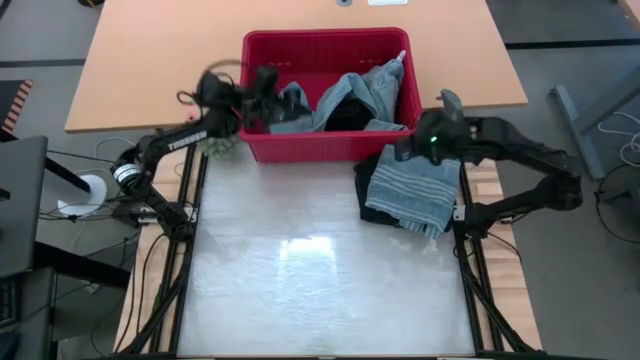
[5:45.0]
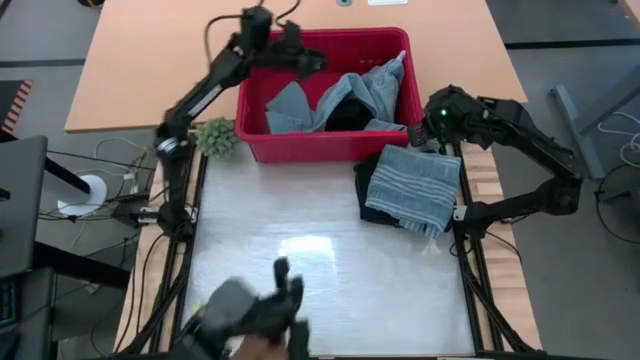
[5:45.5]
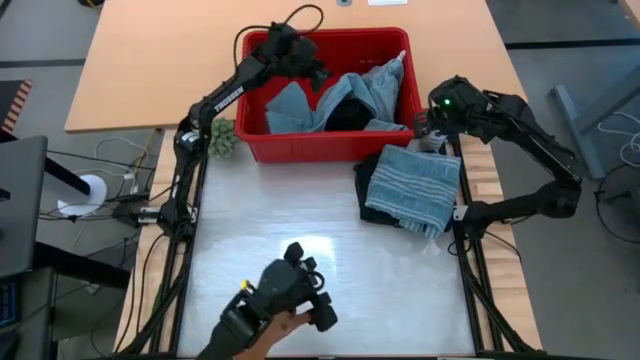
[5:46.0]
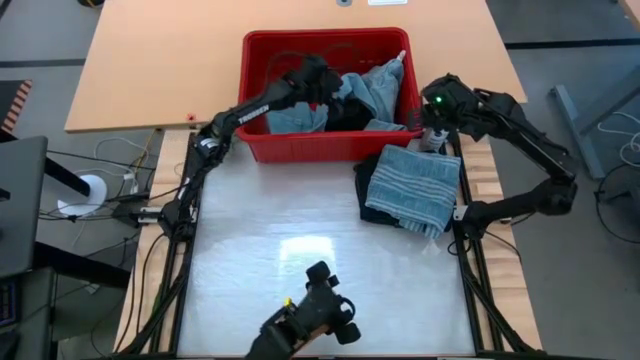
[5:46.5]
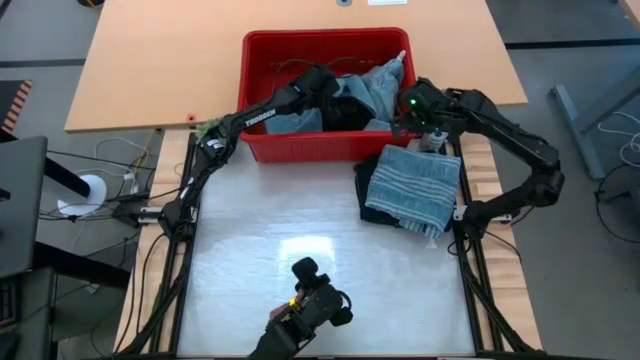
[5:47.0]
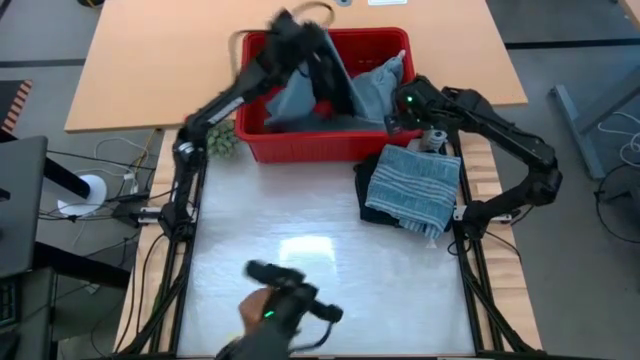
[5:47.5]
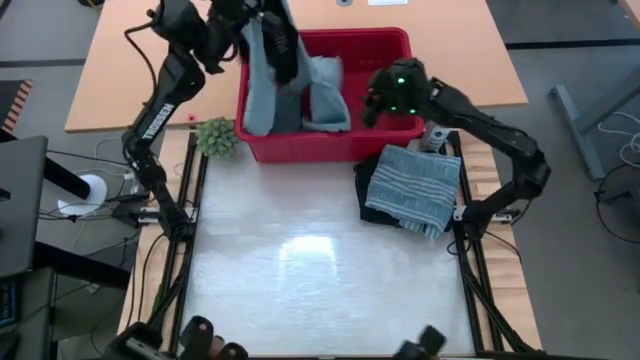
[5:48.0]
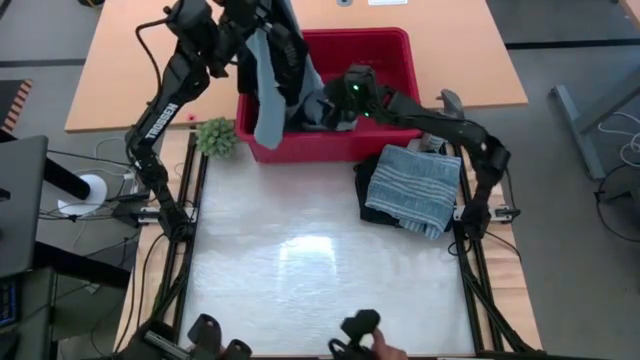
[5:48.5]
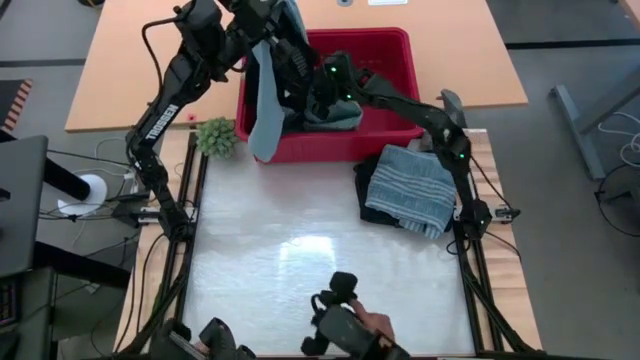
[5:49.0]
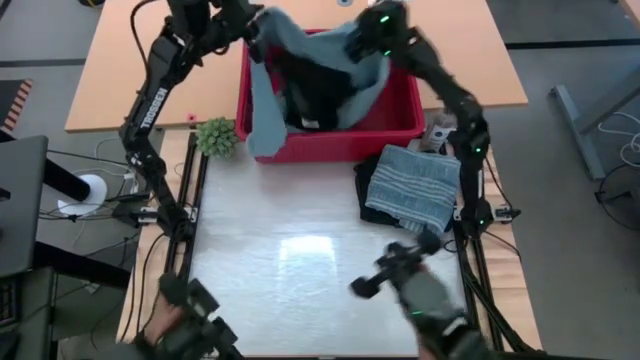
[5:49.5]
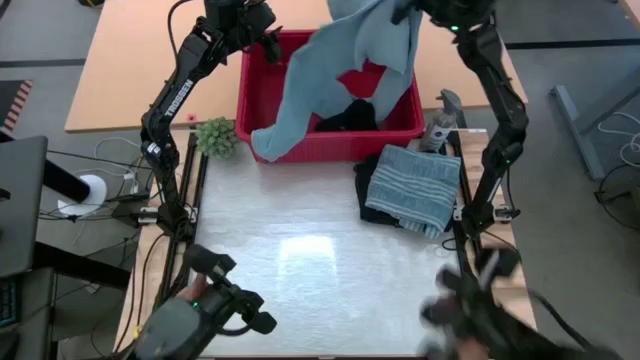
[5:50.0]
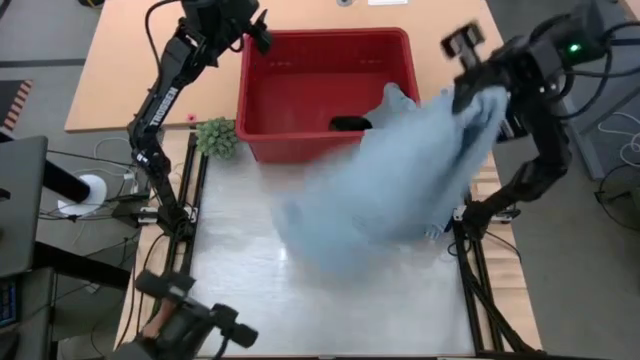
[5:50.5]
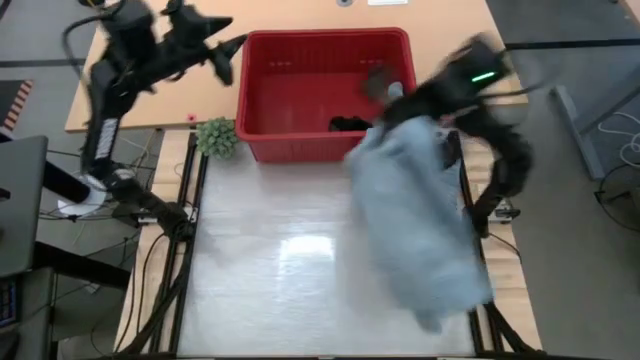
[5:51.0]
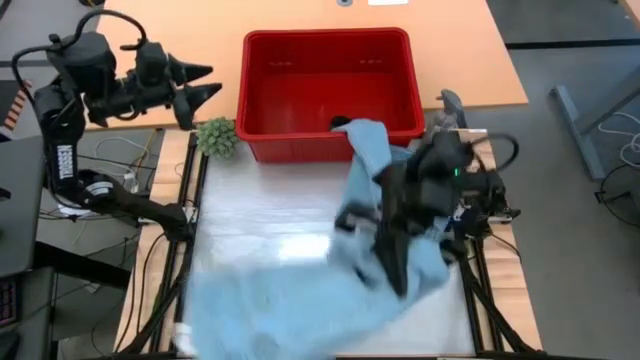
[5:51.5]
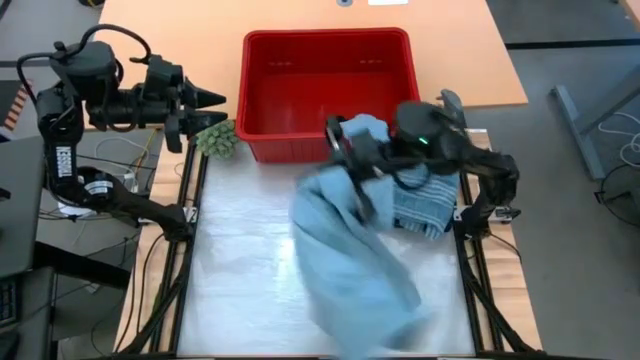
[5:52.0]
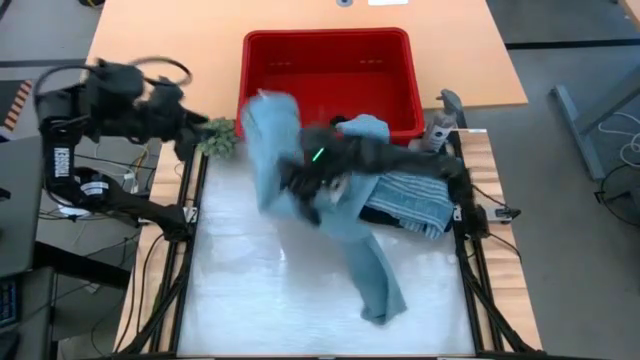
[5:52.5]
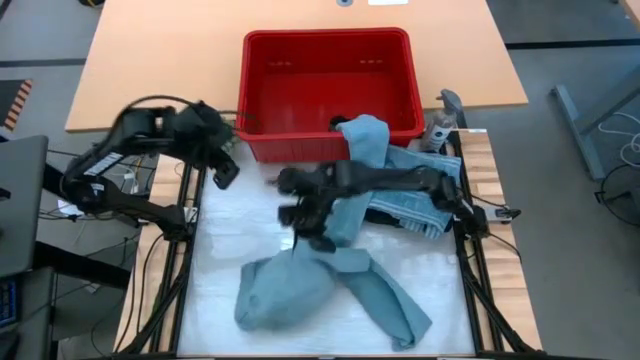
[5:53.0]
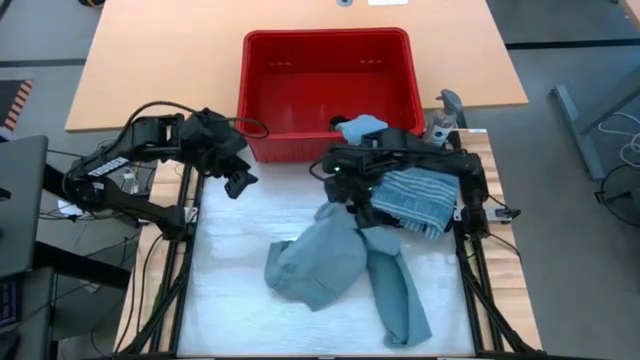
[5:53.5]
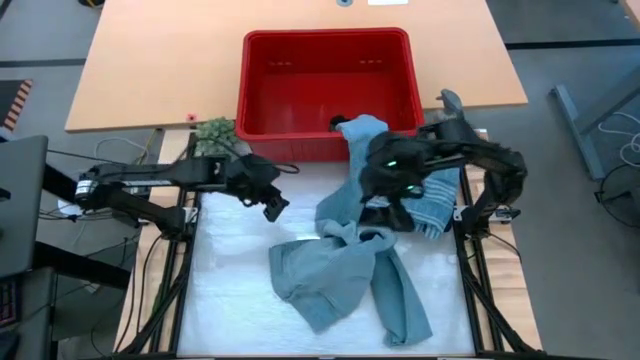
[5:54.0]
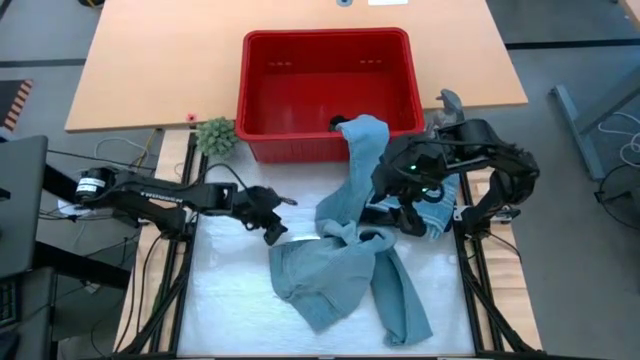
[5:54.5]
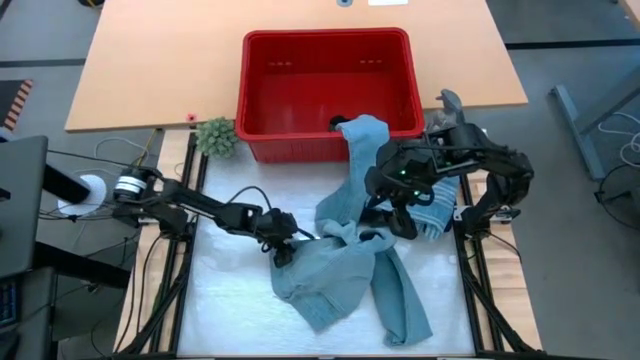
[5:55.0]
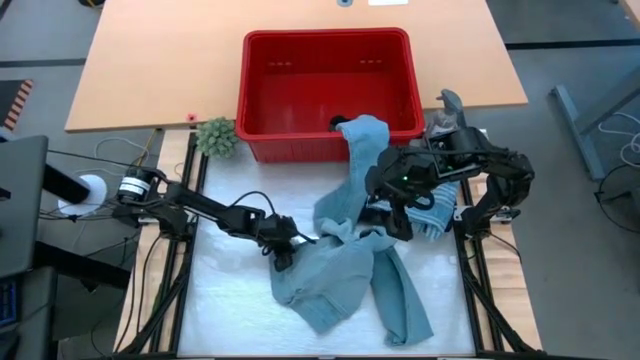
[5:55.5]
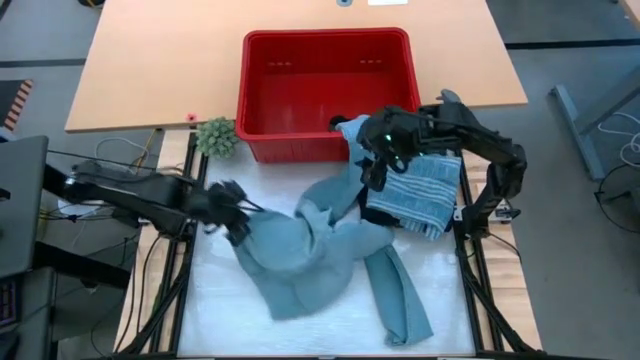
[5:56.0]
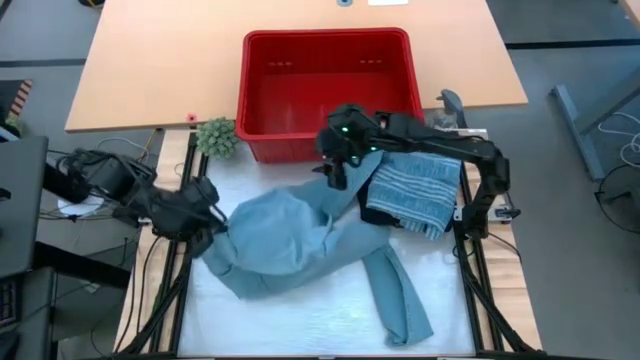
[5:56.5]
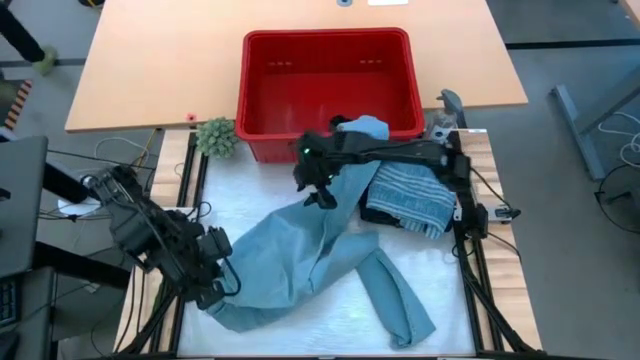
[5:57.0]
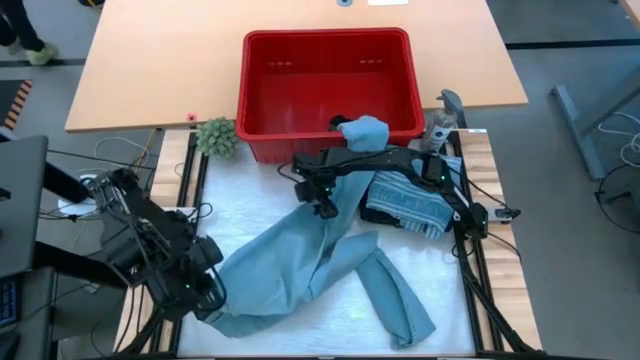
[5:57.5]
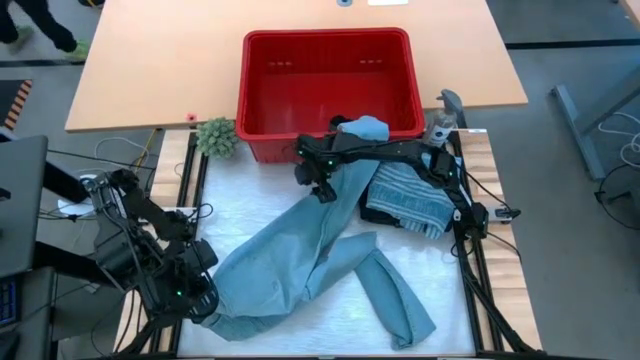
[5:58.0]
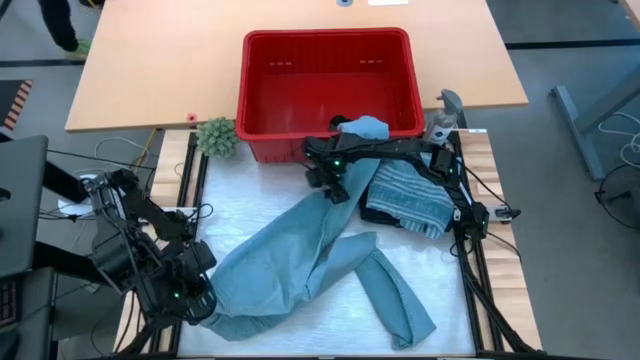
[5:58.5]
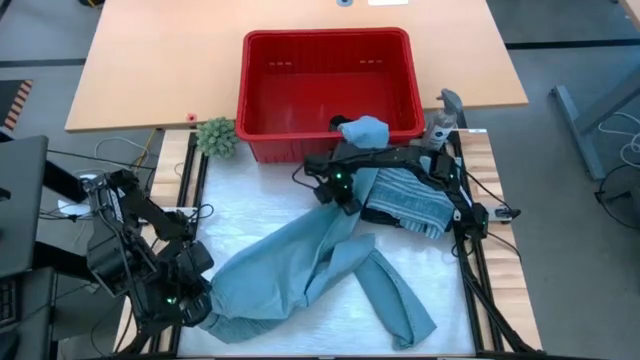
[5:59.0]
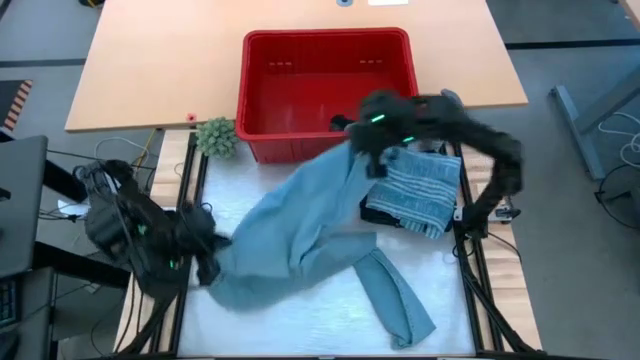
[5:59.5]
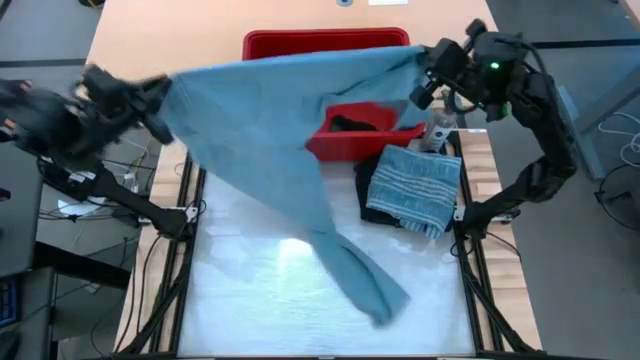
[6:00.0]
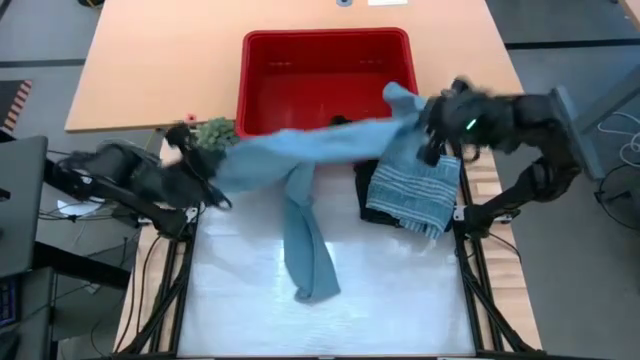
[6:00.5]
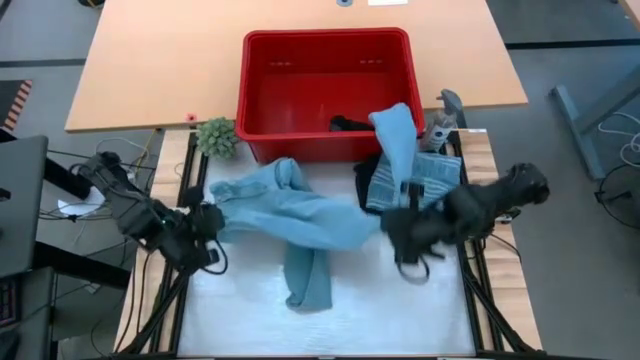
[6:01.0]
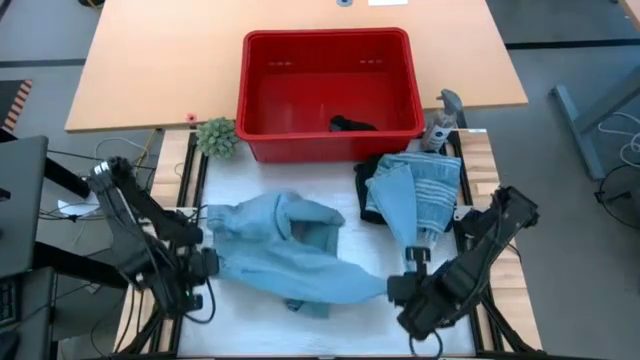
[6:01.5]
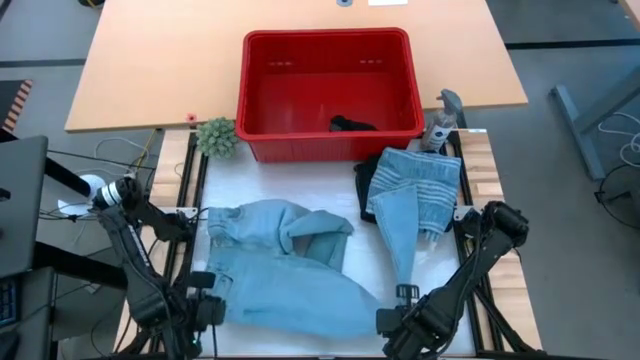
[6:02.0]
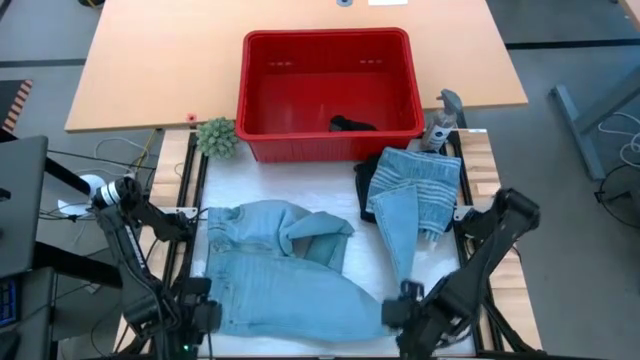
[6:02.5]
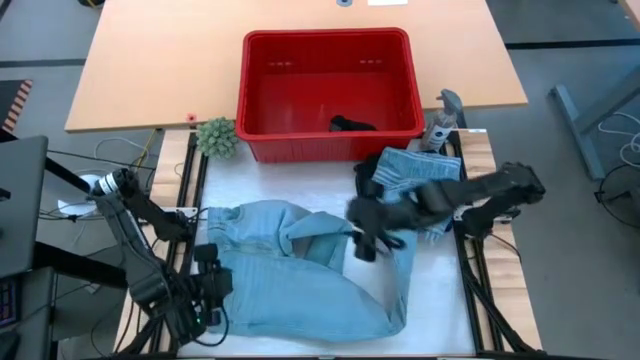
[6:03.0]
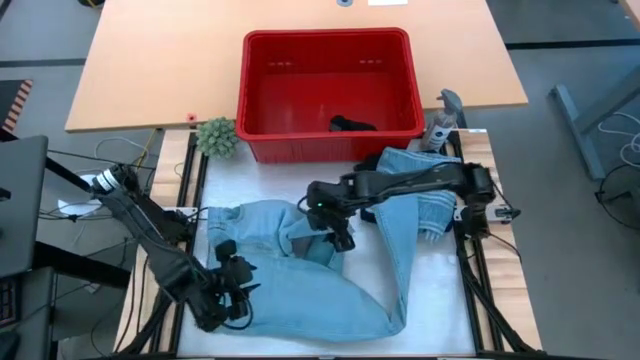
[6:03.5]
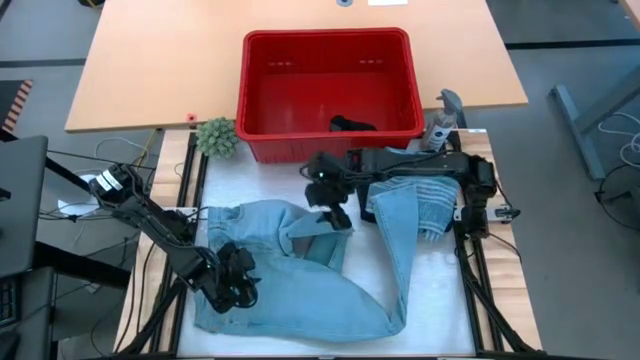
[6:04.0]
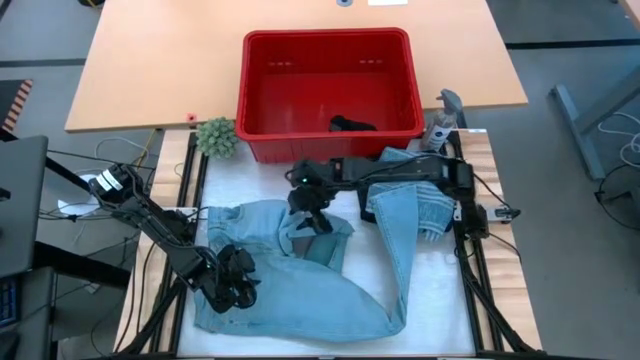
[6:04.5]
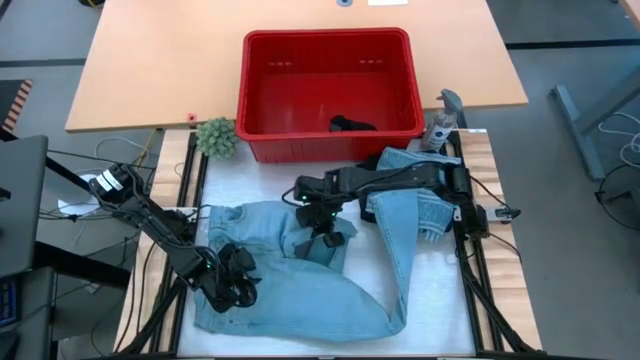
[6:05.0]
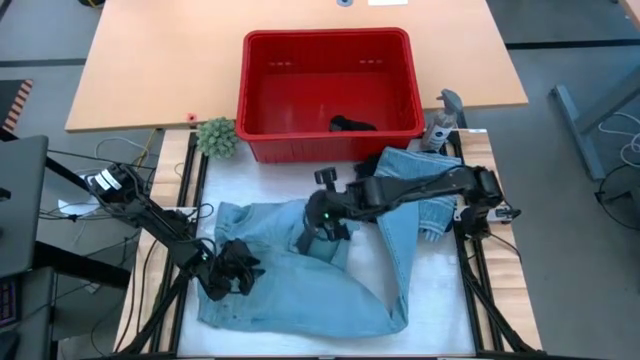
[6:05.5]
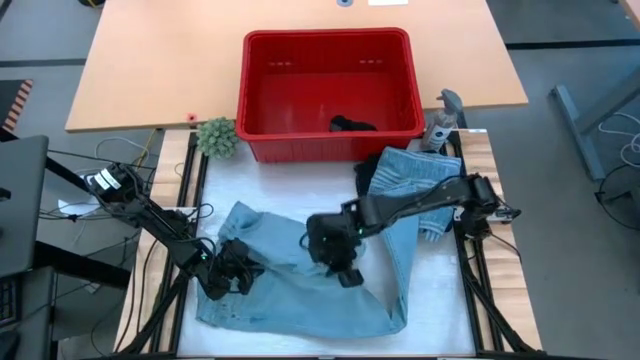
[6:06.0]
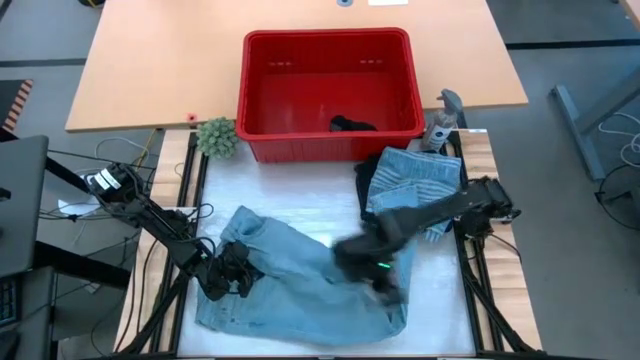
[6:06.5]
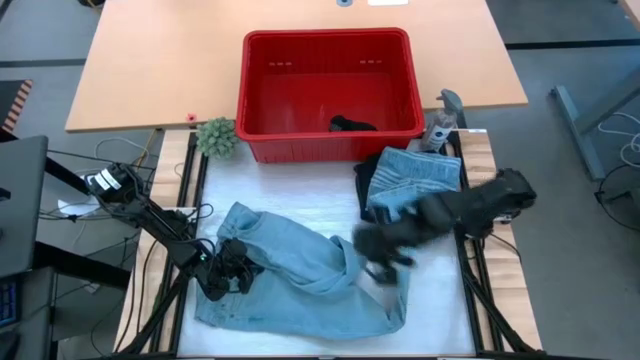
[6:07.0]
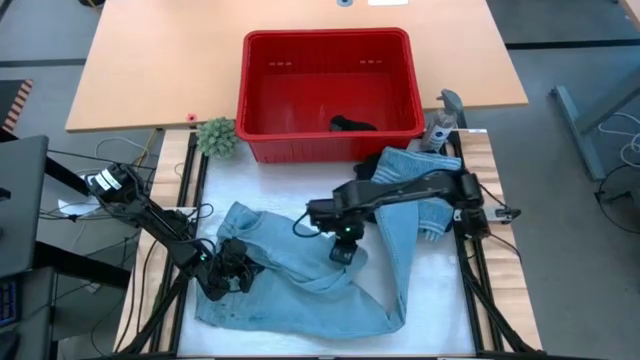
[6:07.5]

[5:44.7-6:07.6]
Task: Fold Laundry from Bin
Fold the blue pants
